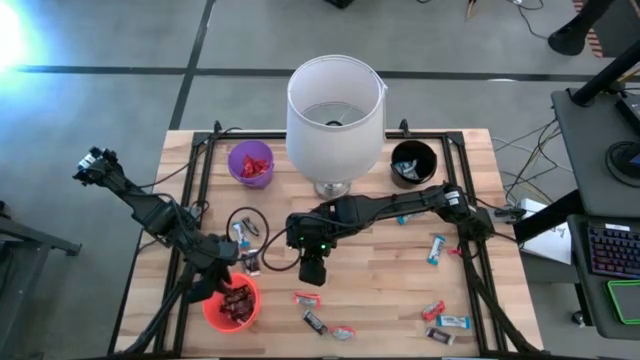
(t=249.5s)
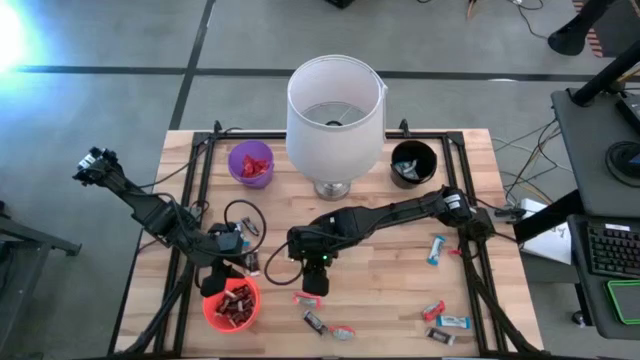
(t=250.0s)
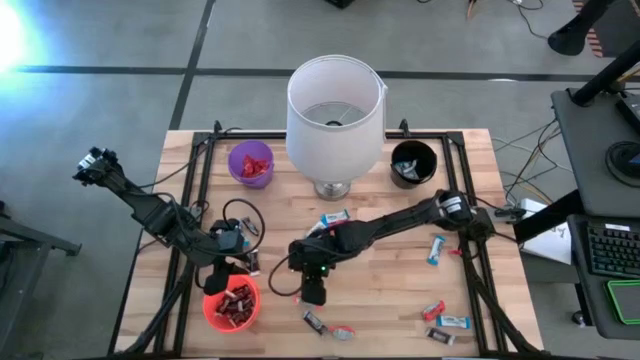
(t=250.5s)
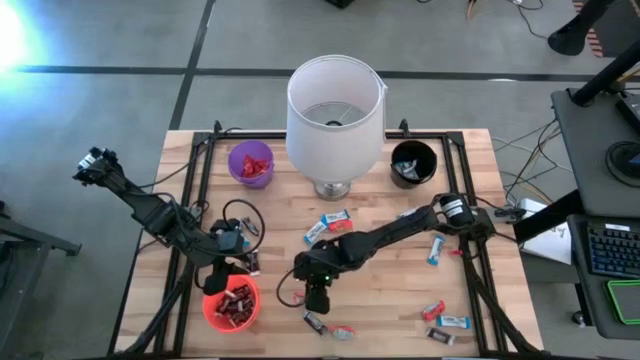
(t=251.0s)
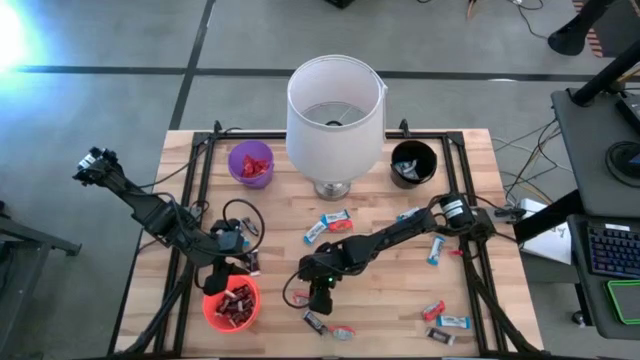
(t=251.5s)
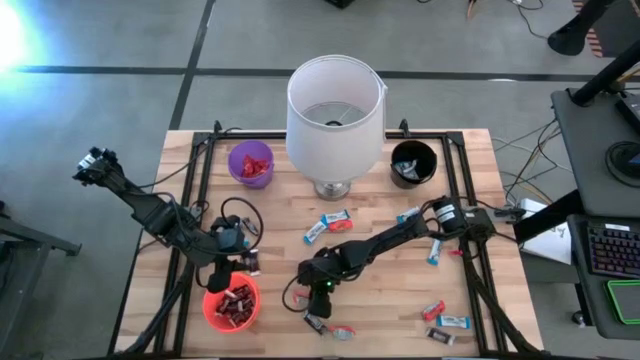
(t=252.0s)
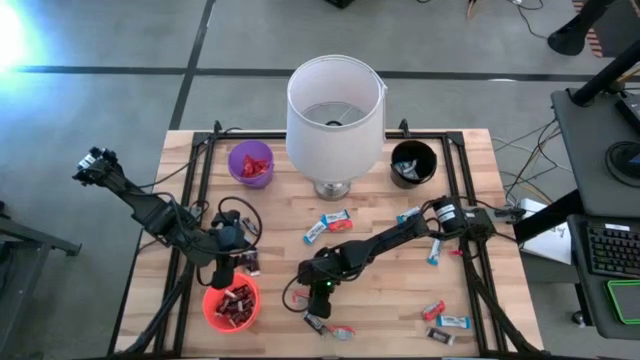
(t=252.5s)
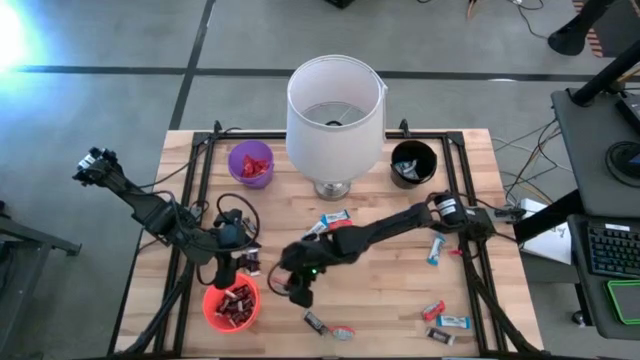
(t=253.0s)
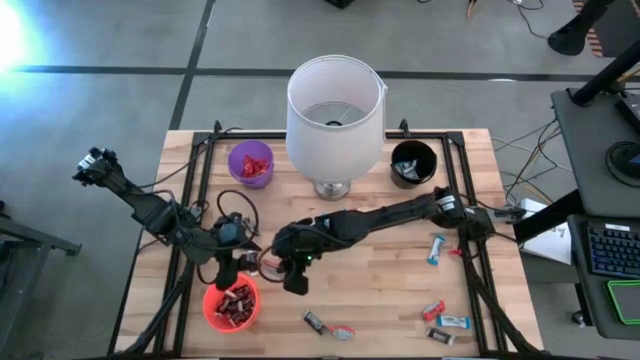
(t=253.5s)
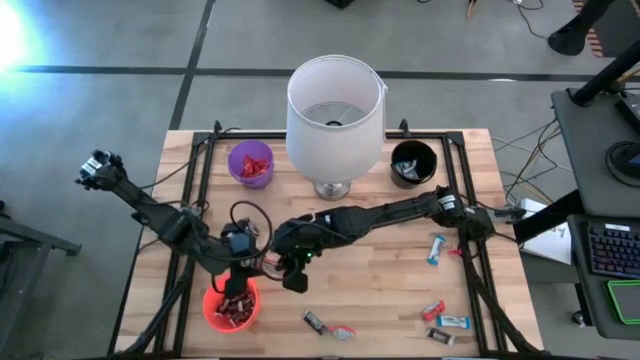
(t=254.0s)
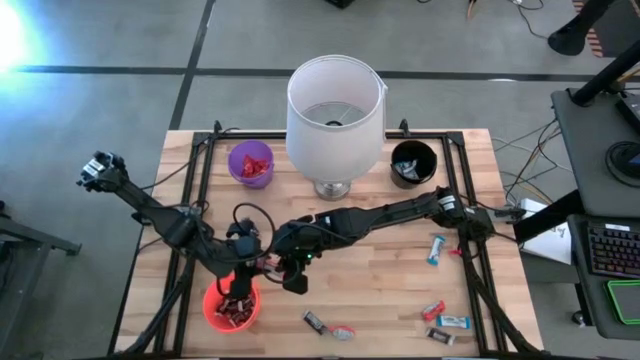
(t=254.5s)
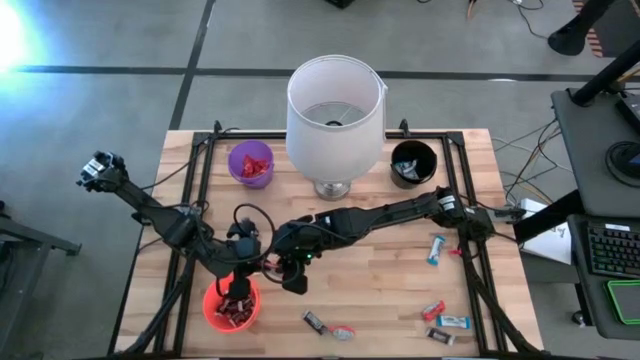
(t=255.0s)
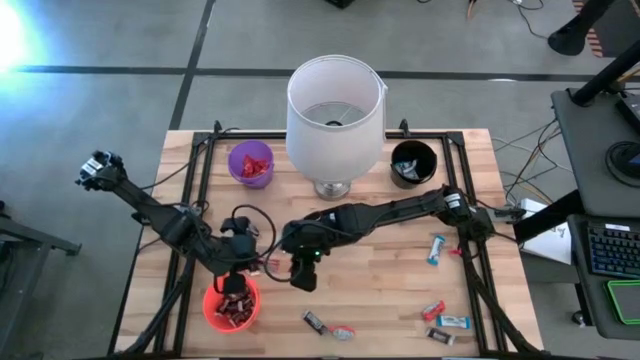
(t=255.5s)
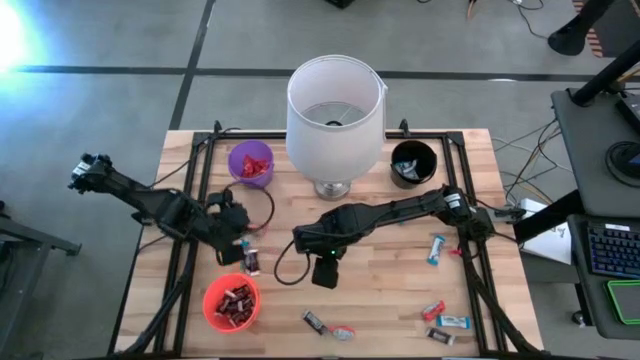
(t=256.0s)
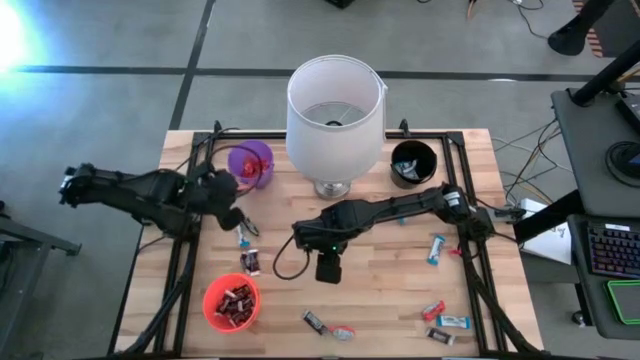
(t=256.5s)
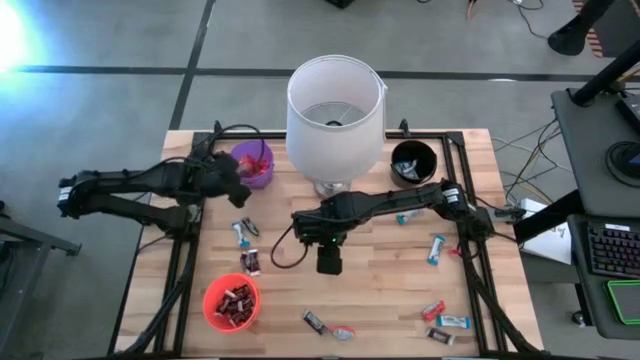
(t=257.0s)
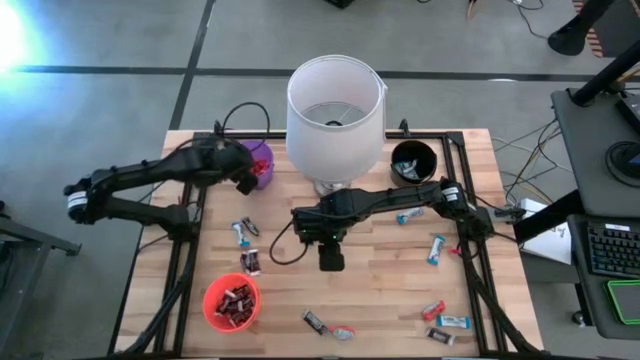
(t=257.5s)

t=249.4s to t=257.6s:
Task: Sort candy
Put the orange chocolate into the purple bucket

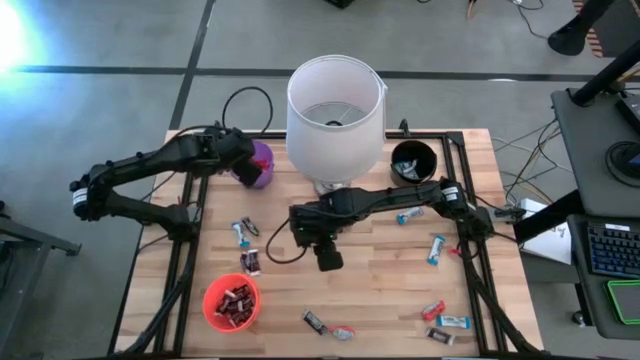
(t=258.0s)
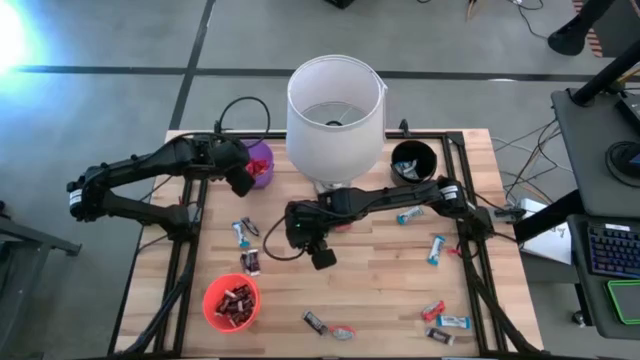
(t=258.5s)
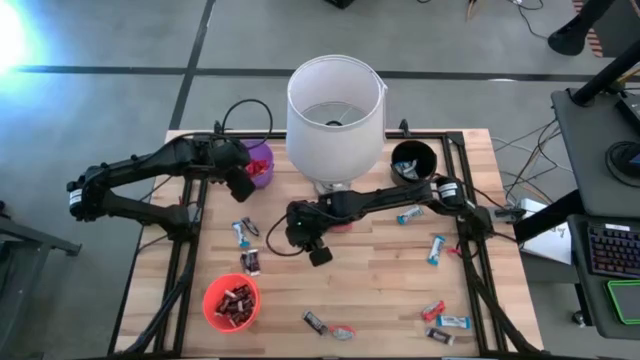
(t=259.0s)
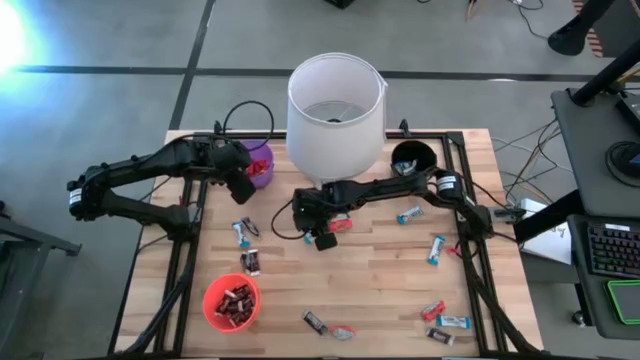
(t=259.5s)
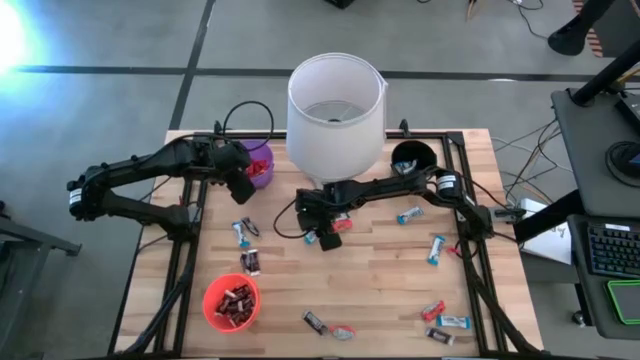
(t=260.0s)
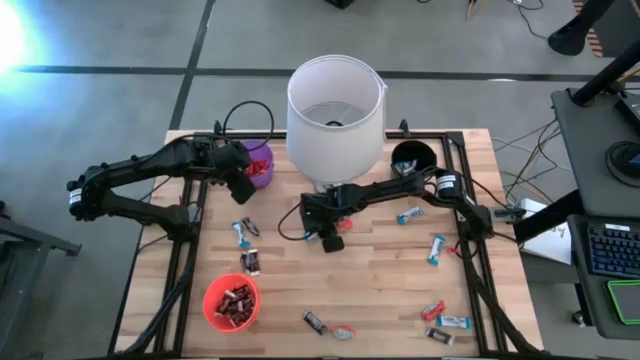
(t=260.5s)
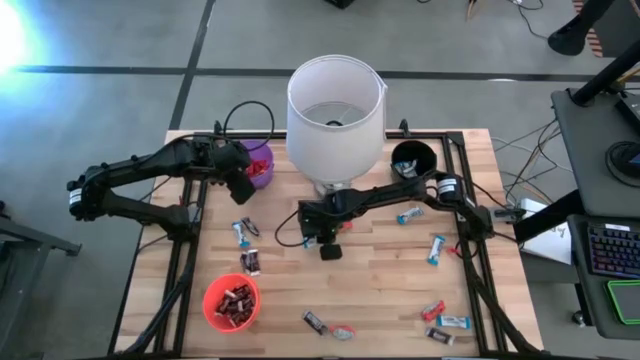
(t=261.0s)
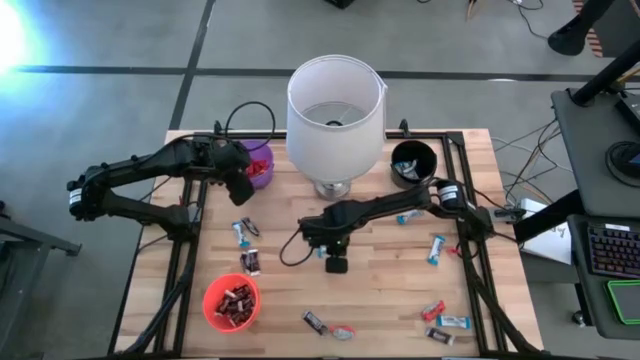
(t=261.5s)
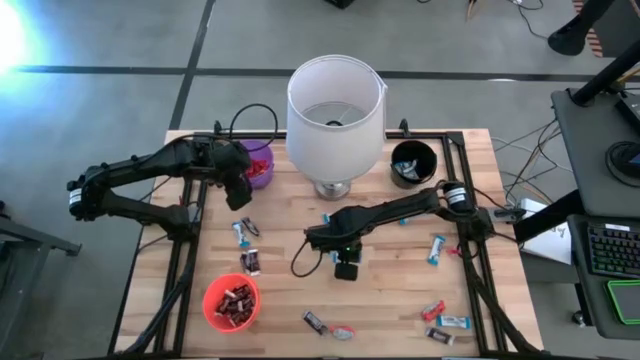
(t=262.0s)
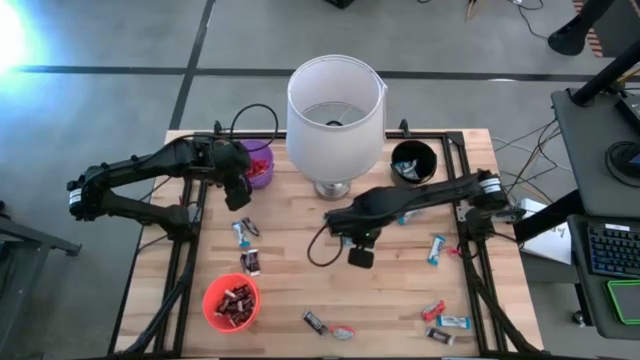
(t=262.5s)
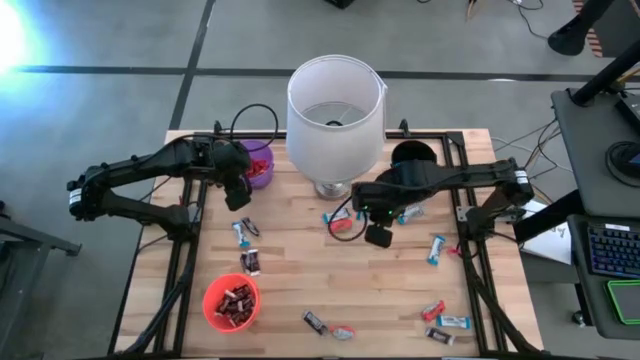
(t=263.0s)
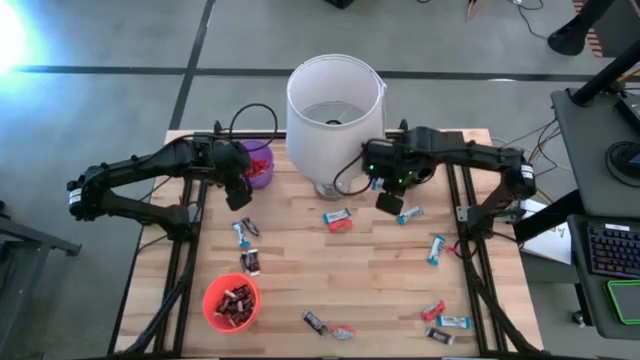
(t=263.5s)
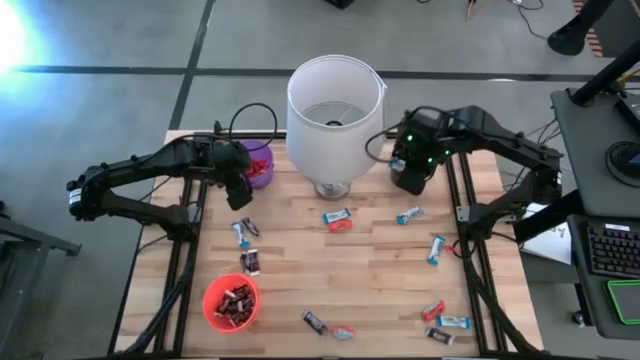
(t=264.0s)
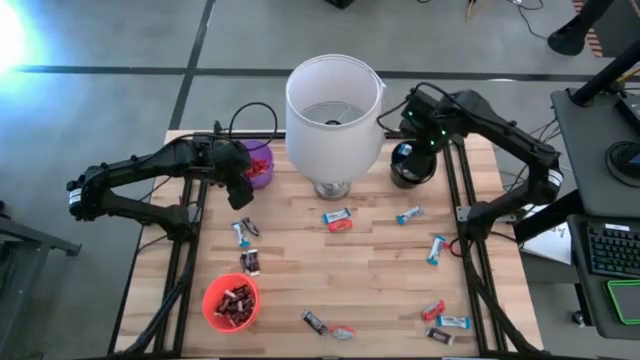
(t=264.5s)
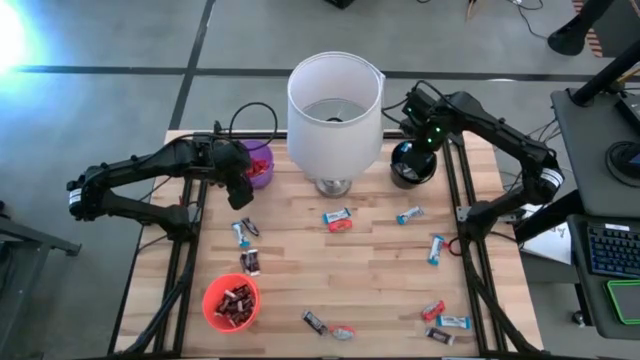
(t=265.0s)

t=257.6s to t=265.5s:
Put the white chocolate into the black bin

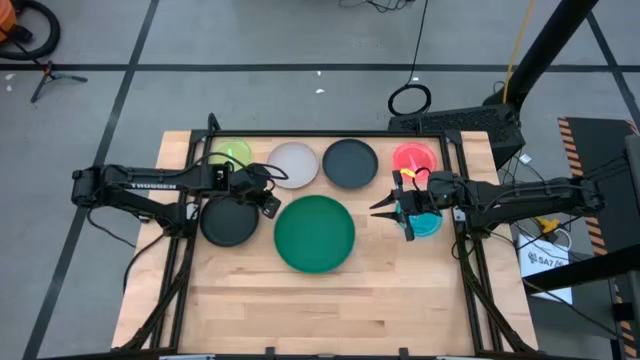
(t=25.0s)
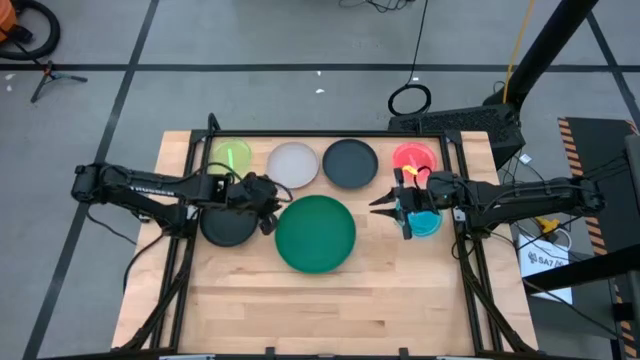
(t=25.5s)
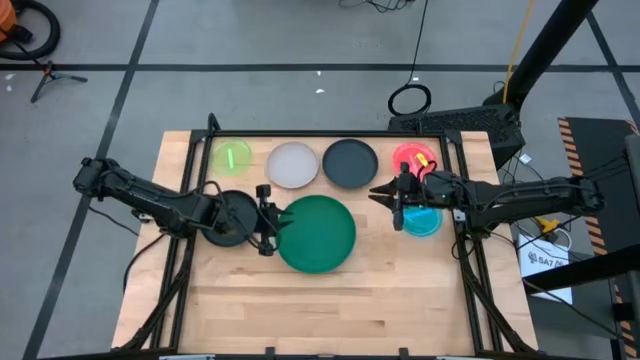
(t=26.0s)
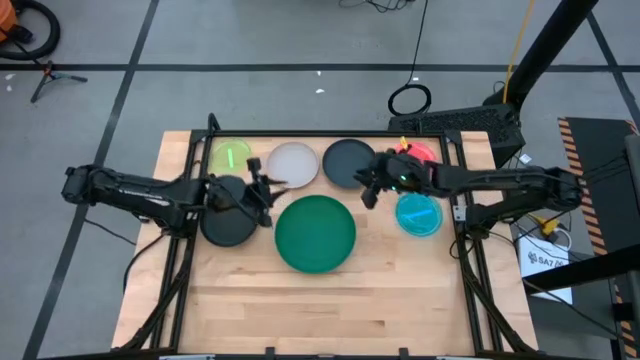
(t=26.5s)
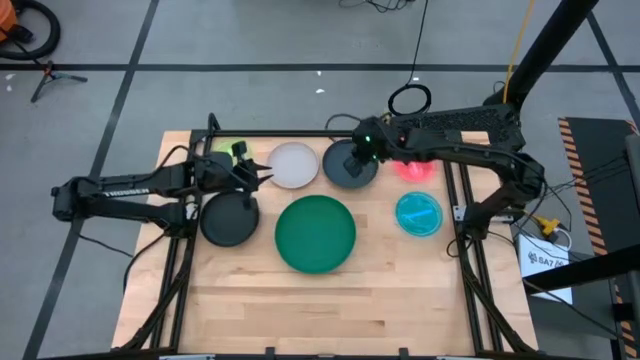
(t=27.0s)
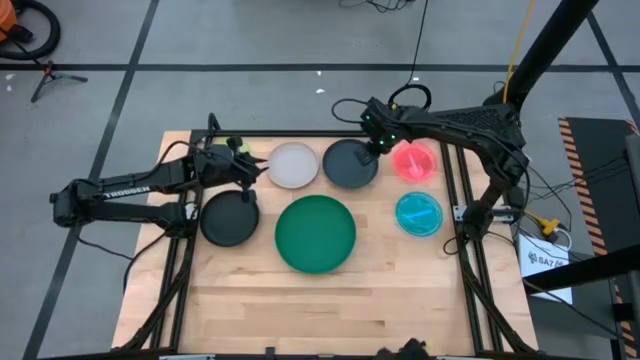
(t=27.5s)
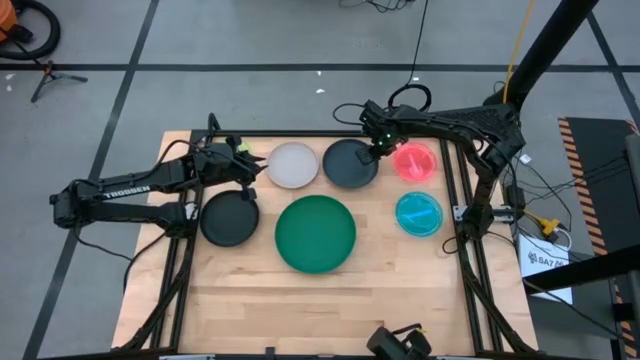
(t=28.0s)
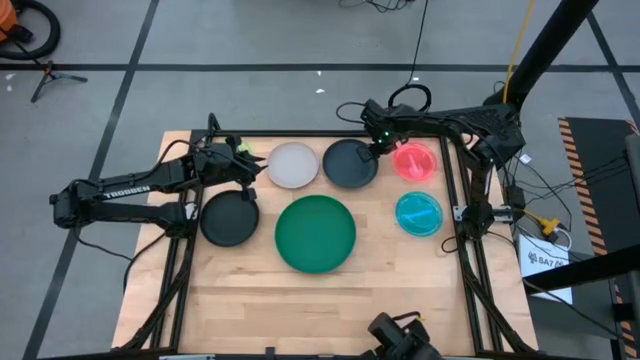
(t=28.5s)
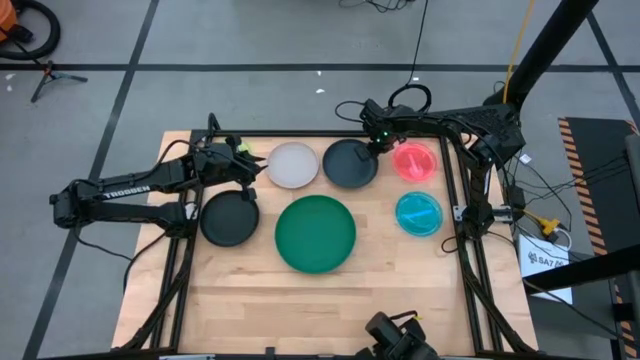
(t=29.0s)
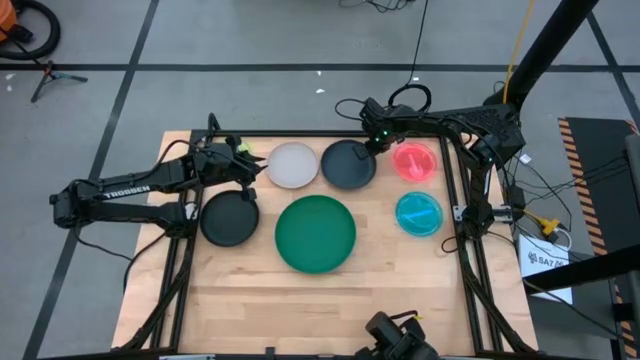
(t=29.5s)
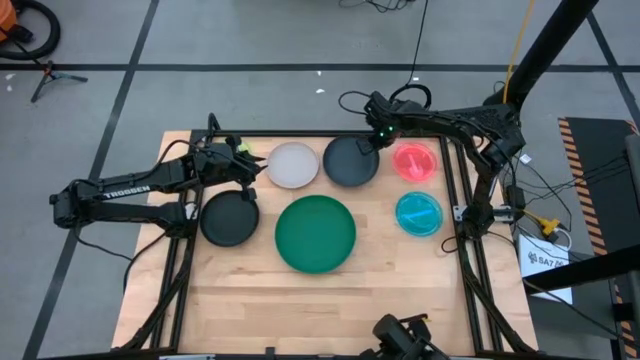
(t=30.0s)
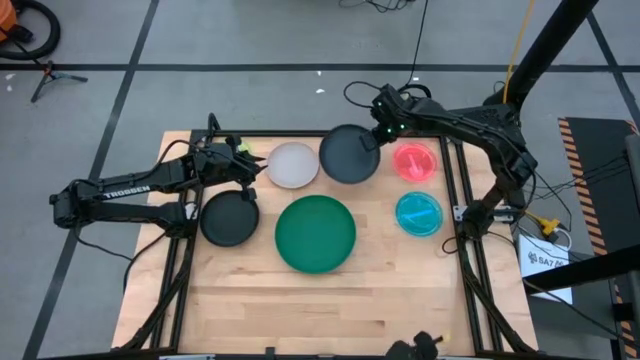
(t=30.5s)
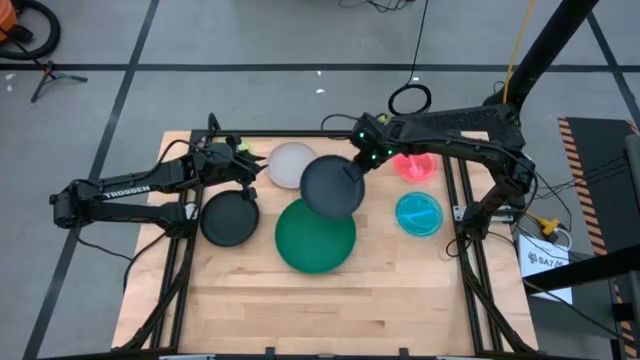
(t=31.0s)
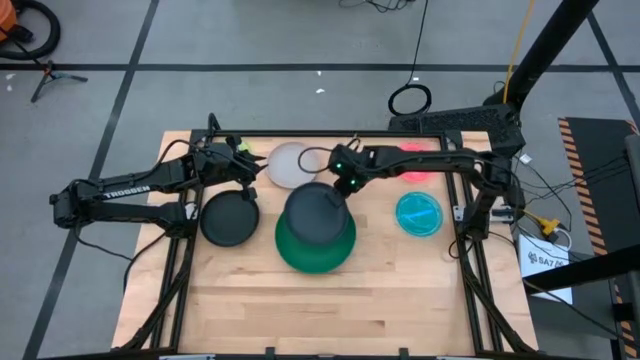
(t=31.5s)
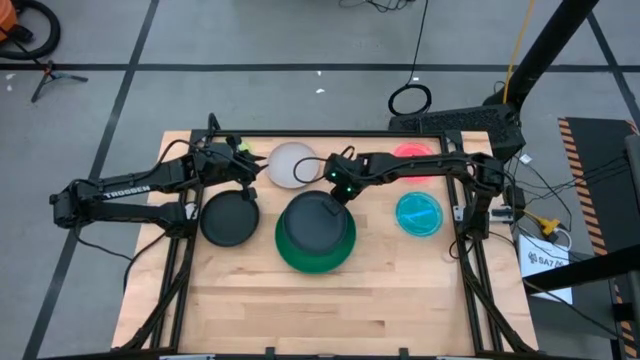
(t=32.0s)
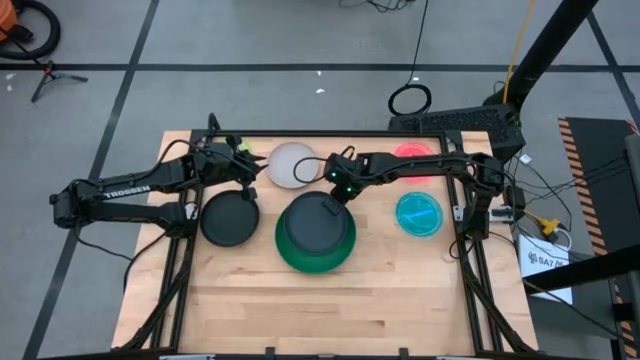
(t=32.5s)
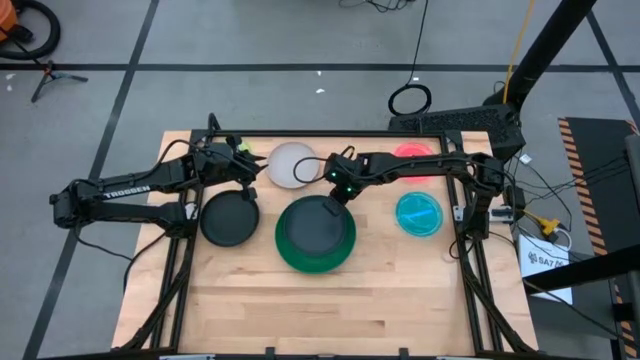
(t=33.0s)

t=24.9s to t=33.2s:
Task: Stack plastic plates
Stack the top black plate on top of the dark green plate
